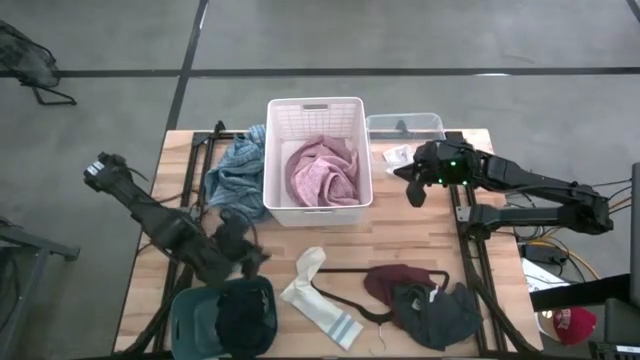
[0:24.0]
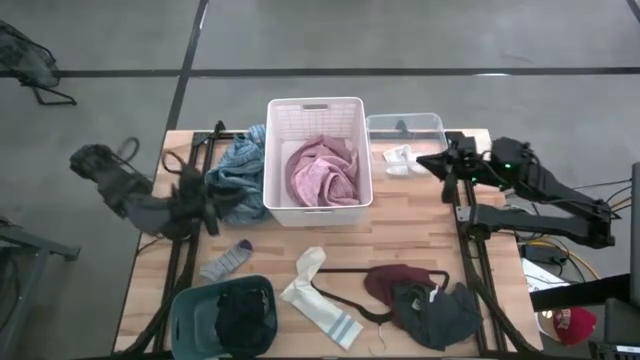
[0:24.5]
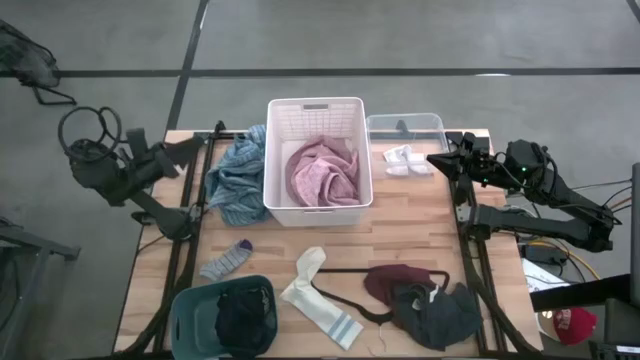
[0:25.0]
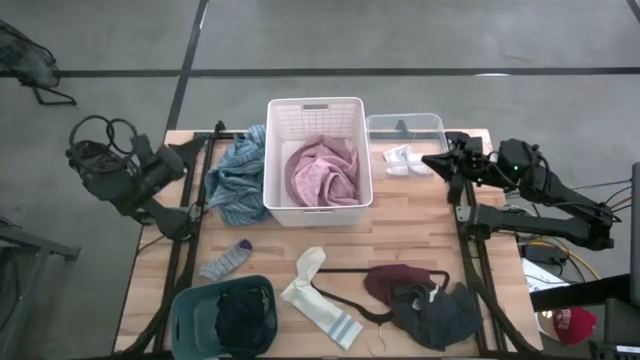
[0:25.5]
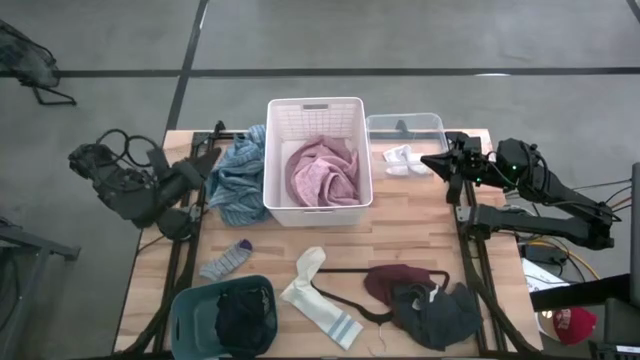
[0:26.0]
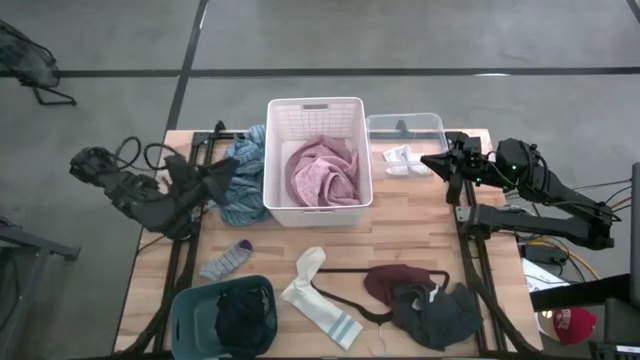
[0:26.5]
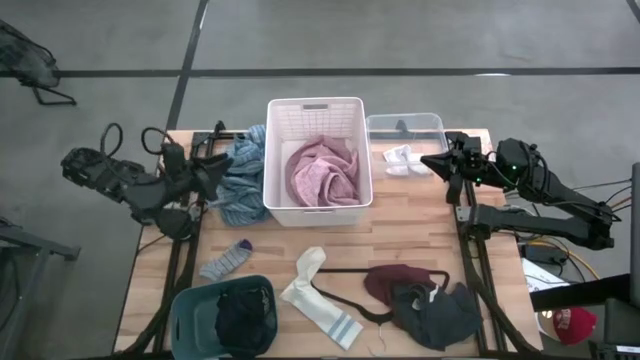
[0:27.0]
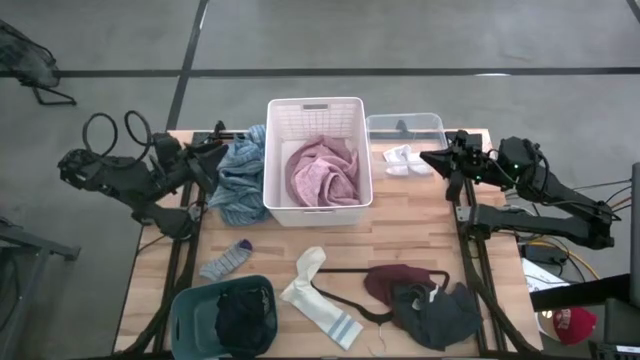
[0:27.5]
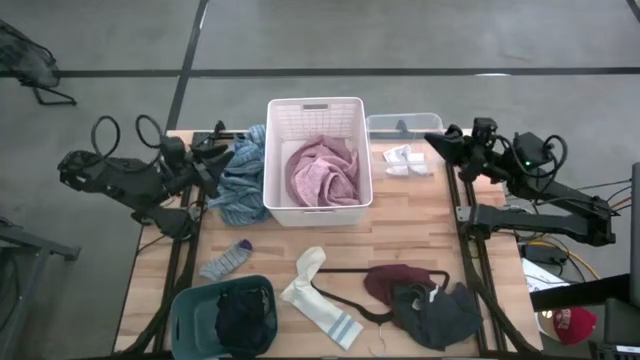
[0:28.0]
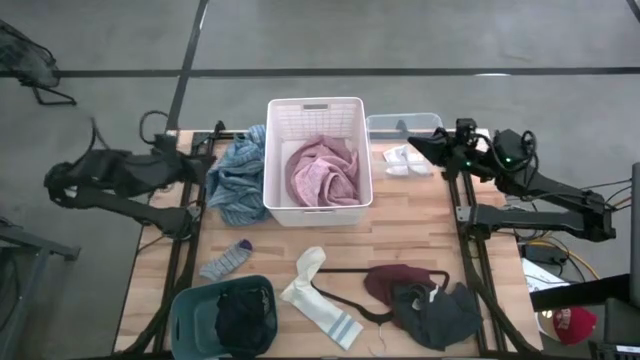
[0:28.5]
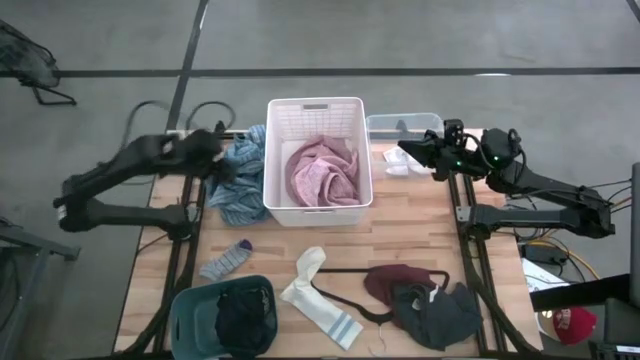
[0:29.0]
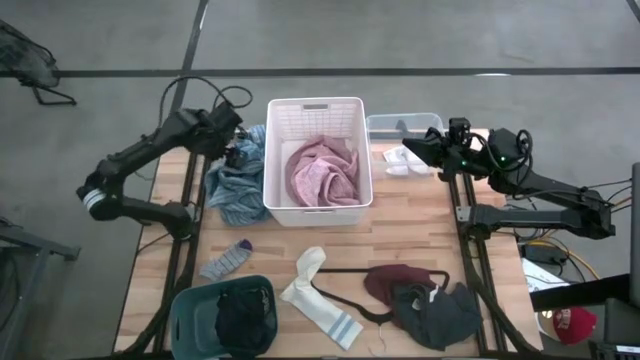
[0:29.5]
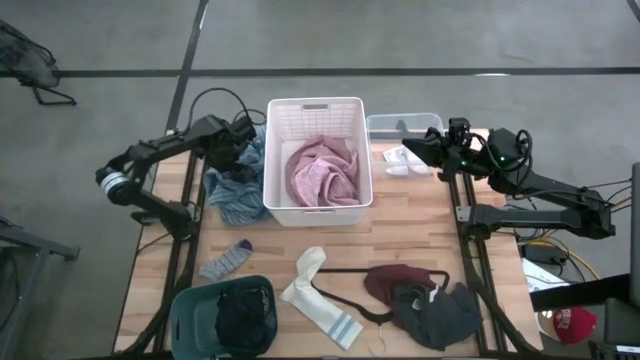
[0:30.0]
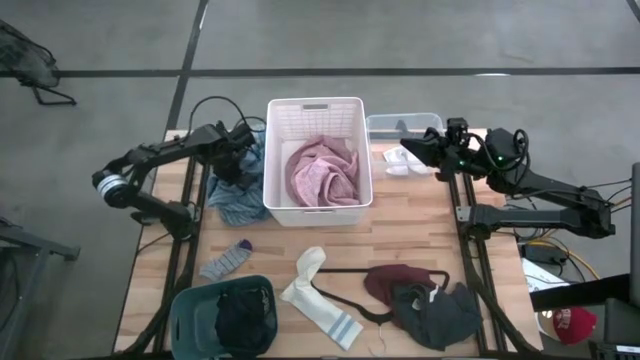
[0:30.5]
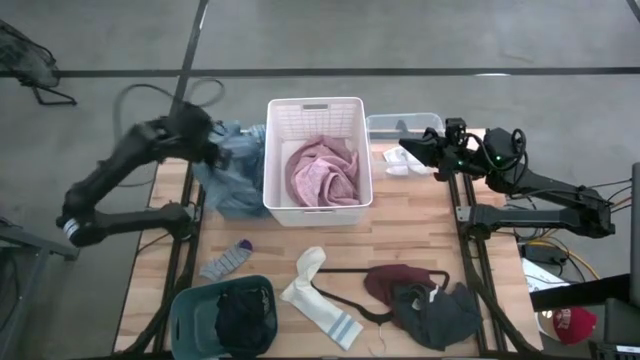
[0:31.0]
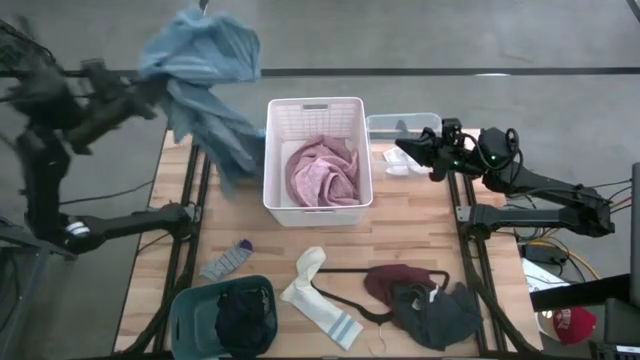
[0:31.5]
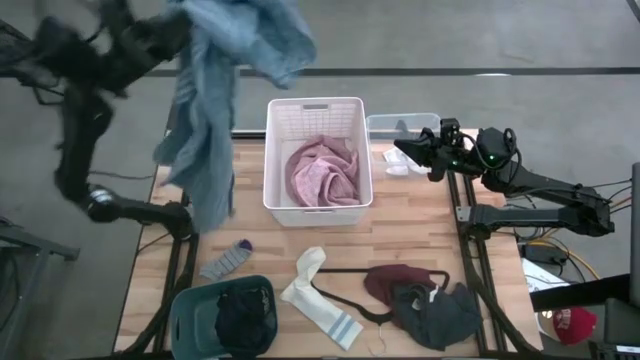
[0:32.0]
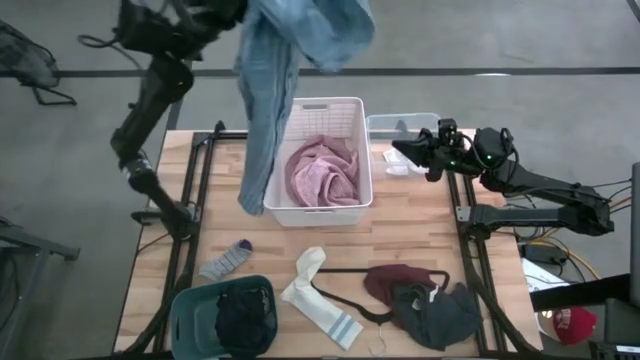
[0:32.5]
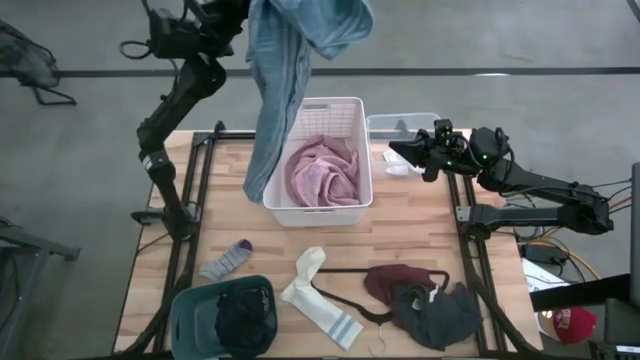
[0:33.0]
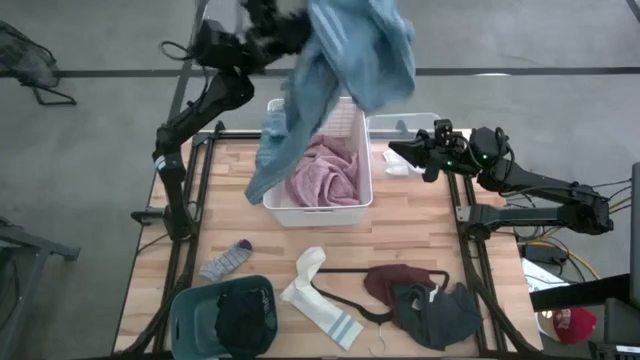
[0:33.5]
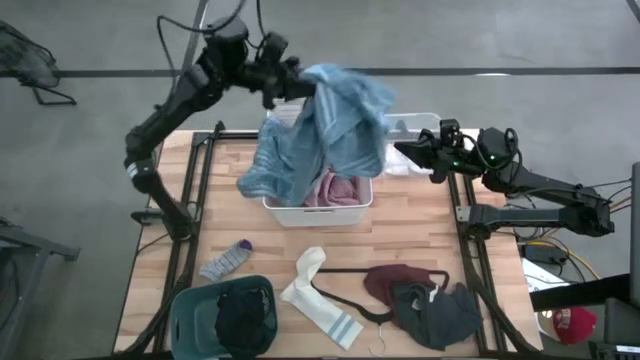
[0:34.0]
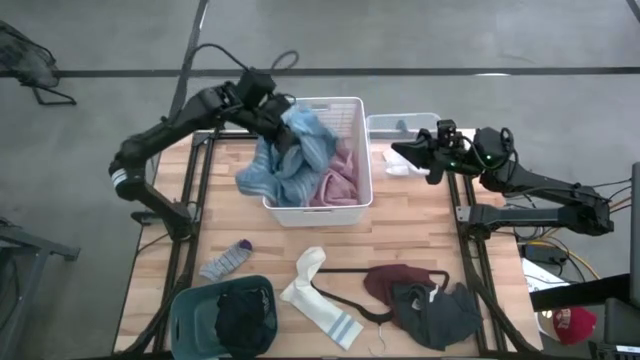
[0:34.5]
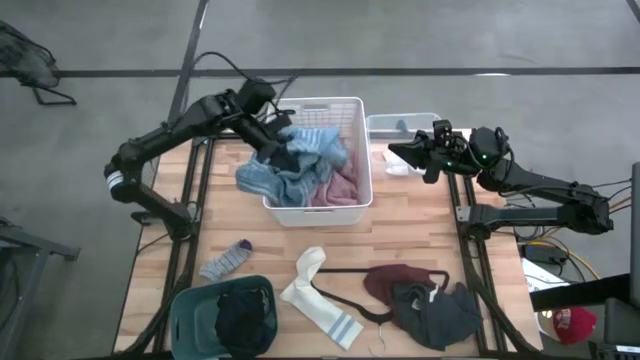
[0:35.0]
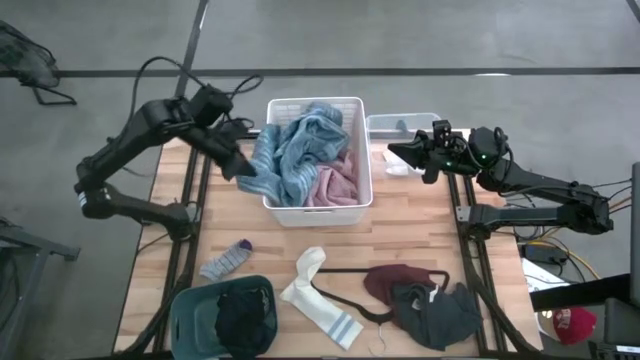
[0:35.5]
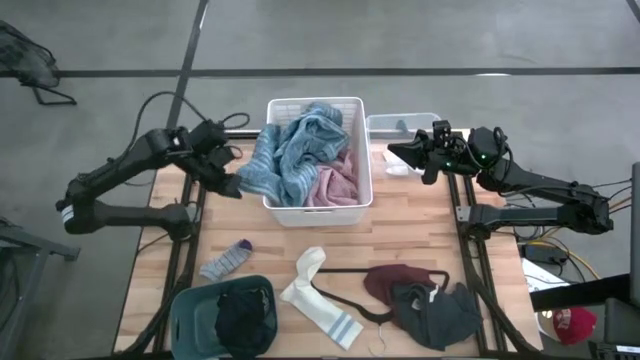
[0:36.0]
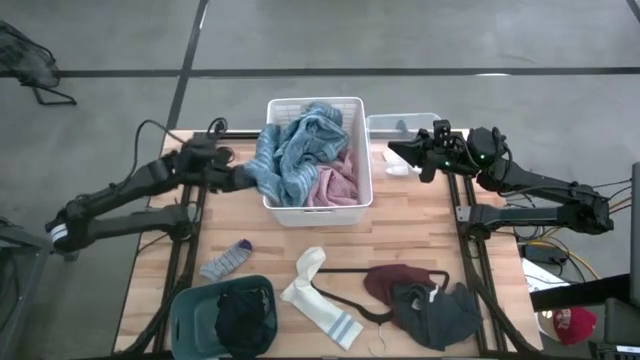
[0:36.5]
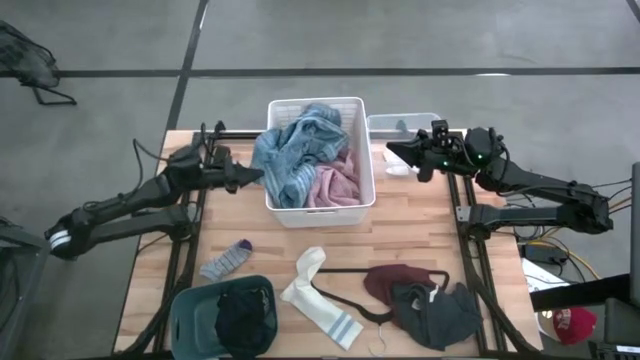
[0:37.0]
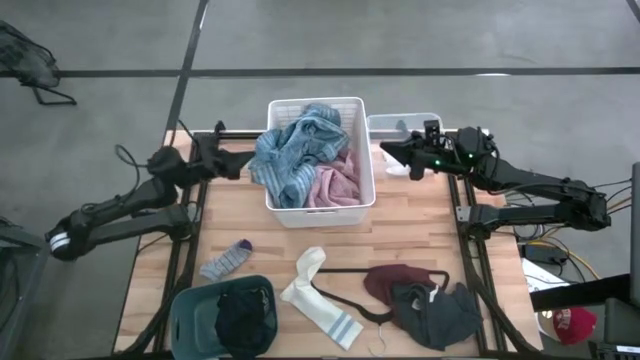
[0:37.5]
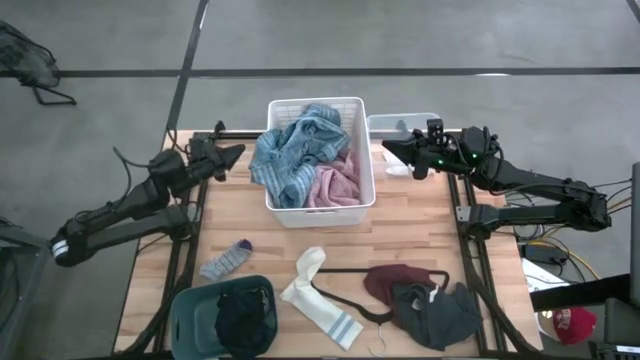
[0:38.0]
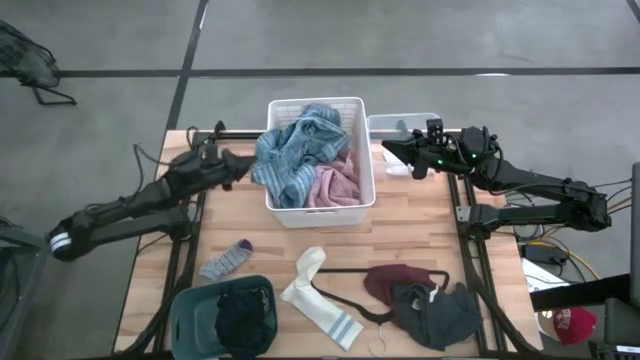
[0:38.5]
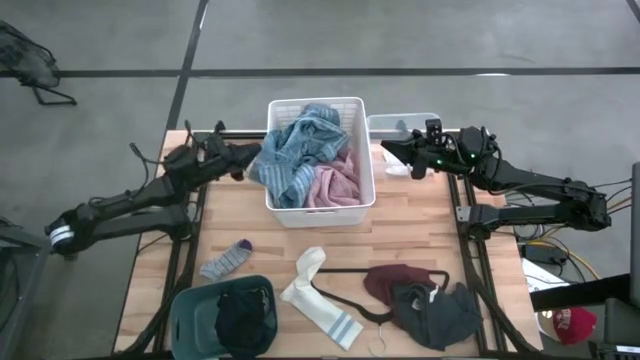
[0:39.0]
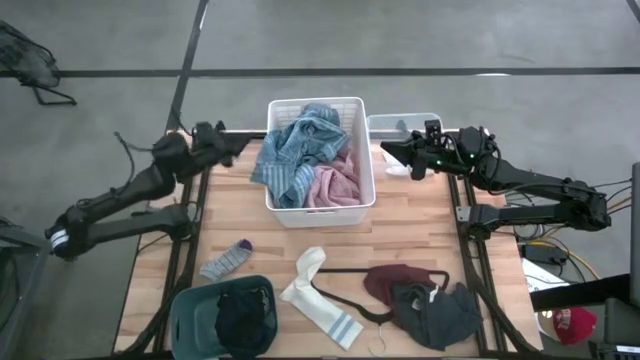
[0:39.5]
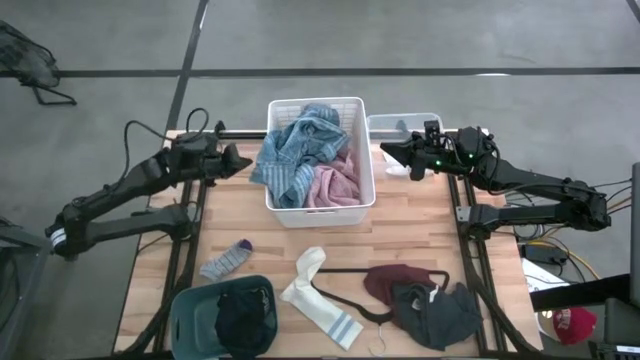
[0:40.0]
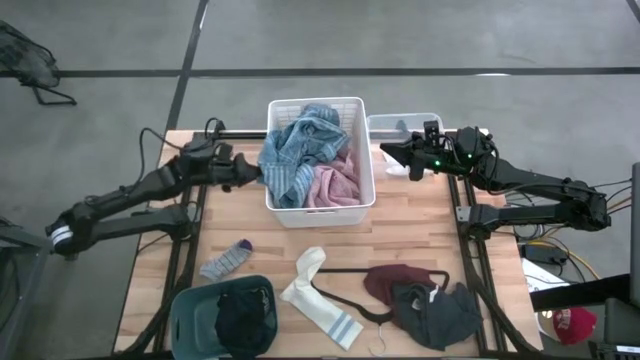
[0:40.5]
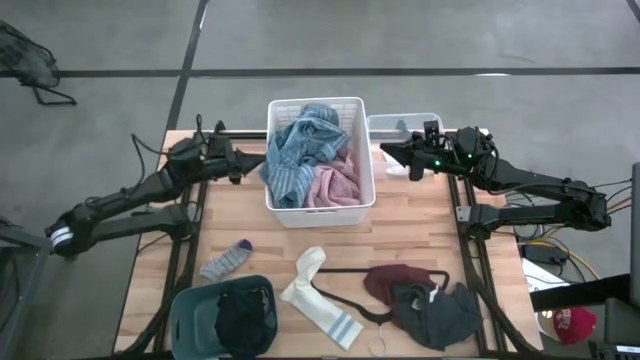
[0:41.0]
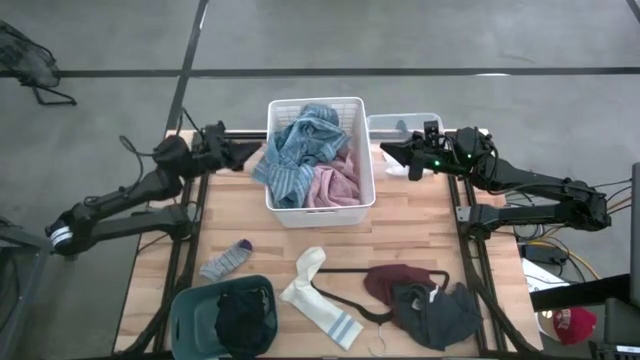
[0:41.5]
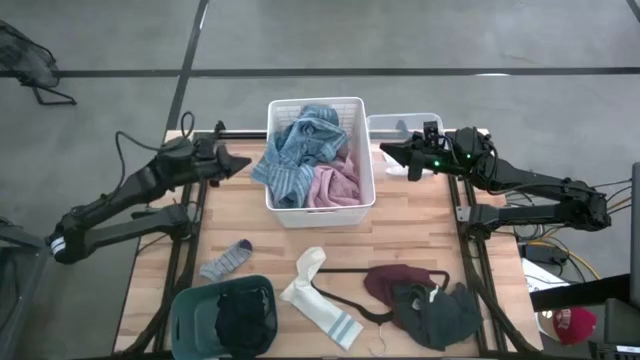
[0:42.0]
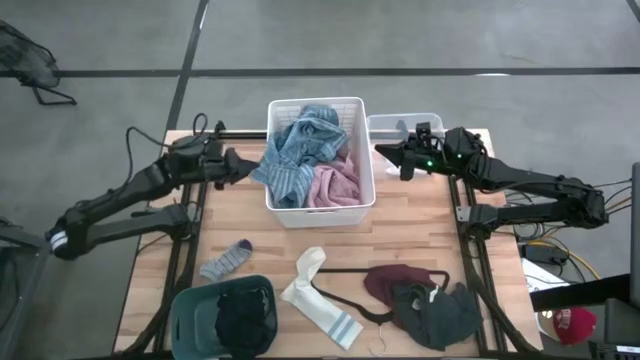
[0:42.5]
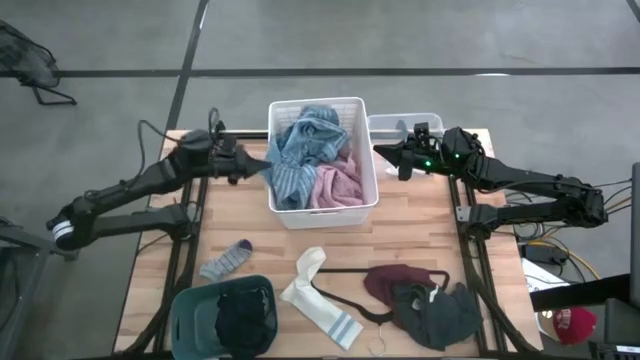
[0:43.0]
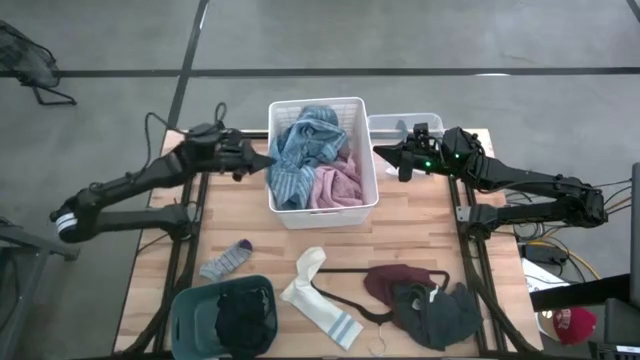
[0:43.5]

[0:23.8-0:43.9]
Task: Pick & Place Cloths
Put the blue towel into the white laundry basket

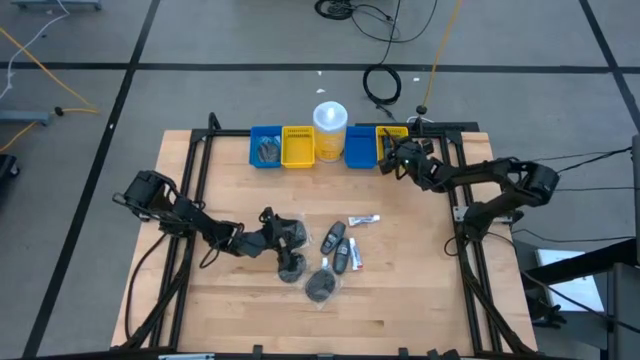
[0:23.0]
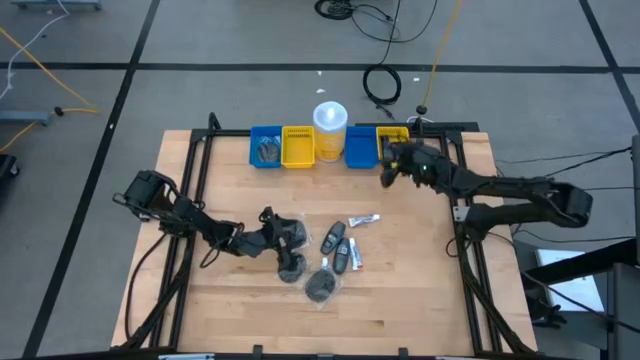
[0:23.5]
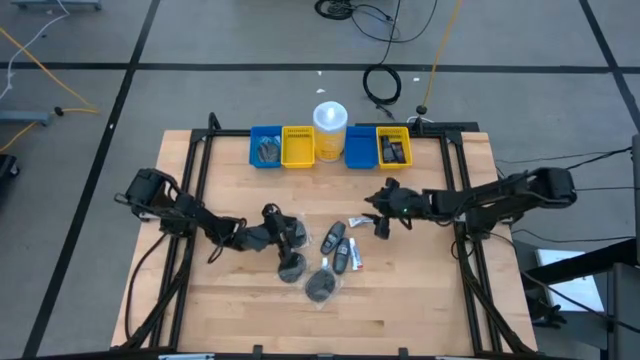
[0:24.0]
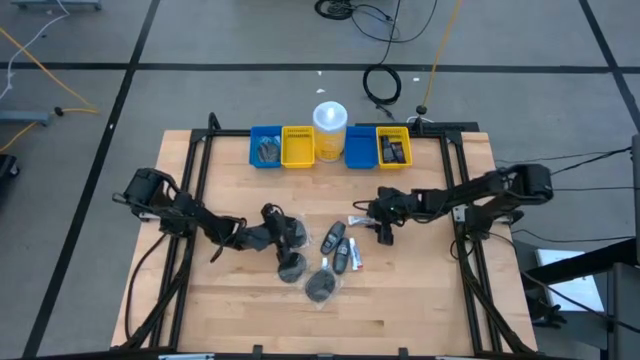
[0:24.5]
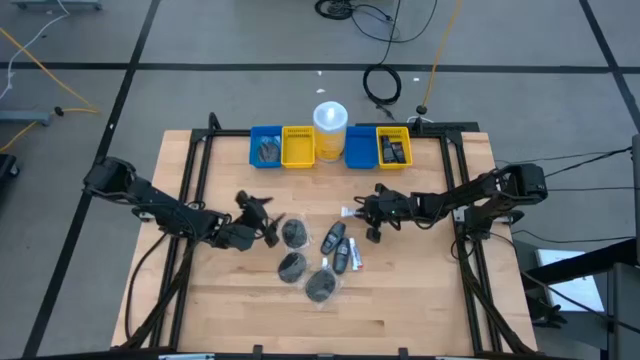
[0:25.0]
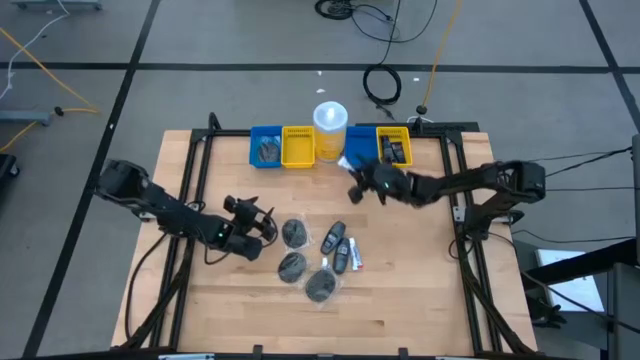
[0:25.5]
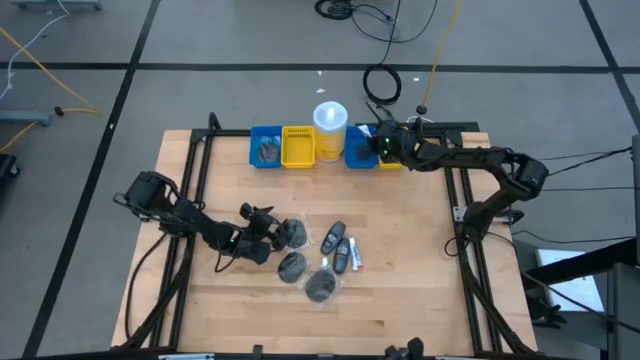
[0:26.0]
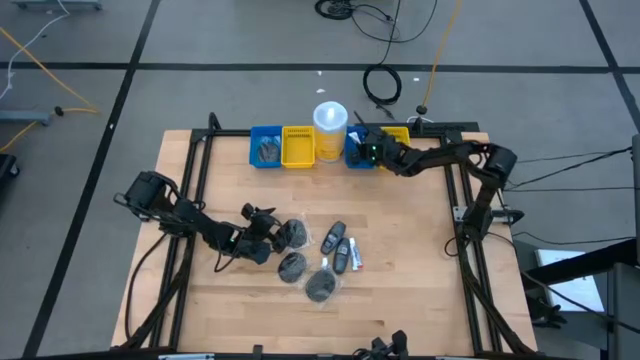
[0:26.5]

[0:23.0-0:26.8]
Task: Pick & Place Travel size toiletries
Put the white toothpaste into the right blue bin
